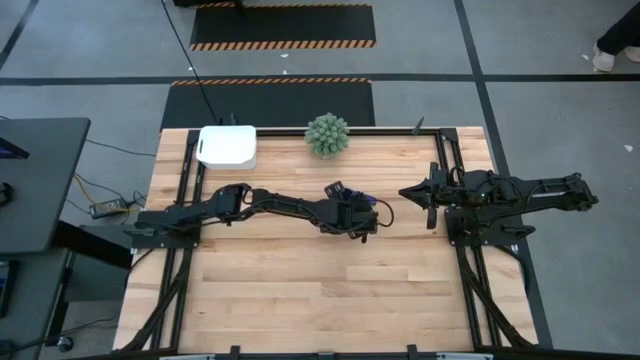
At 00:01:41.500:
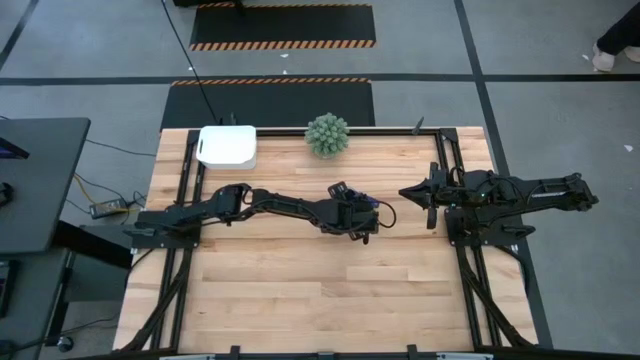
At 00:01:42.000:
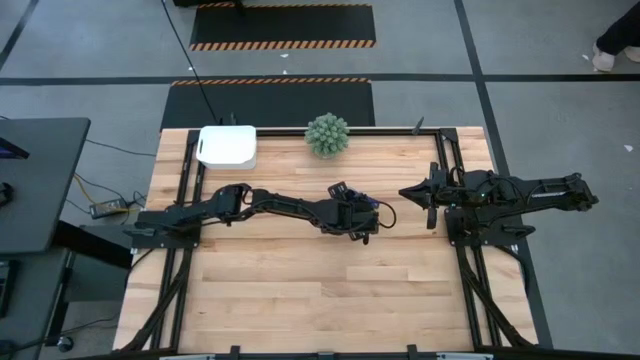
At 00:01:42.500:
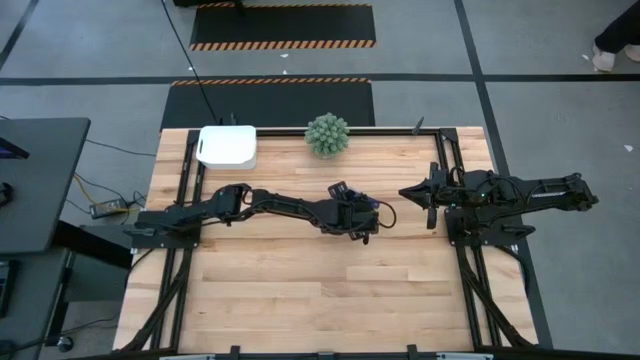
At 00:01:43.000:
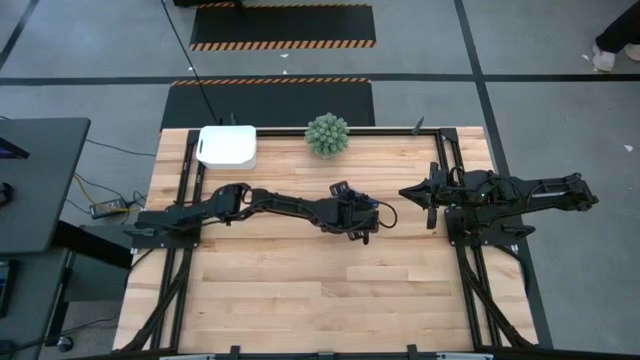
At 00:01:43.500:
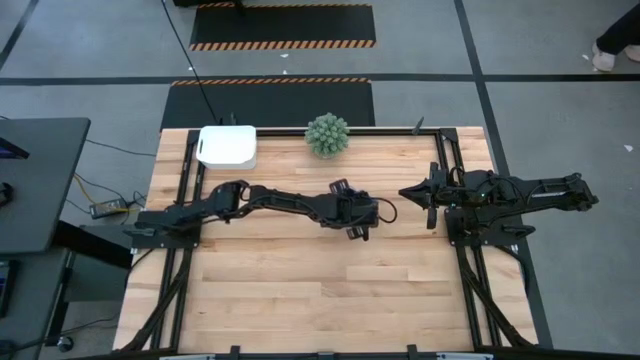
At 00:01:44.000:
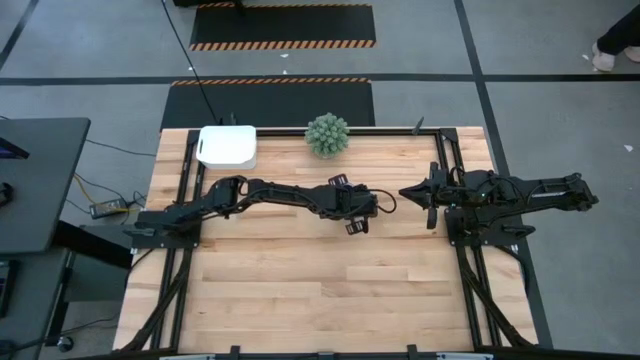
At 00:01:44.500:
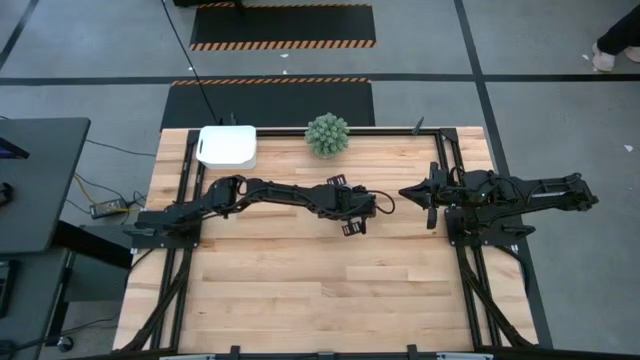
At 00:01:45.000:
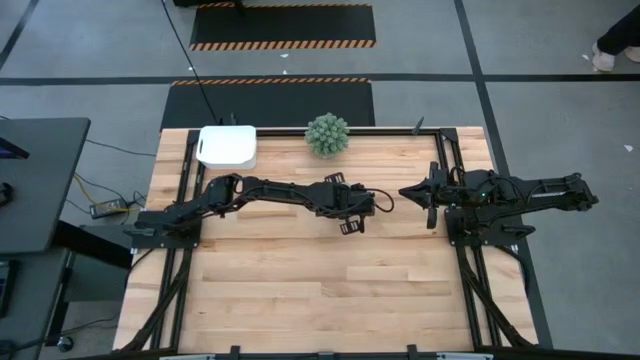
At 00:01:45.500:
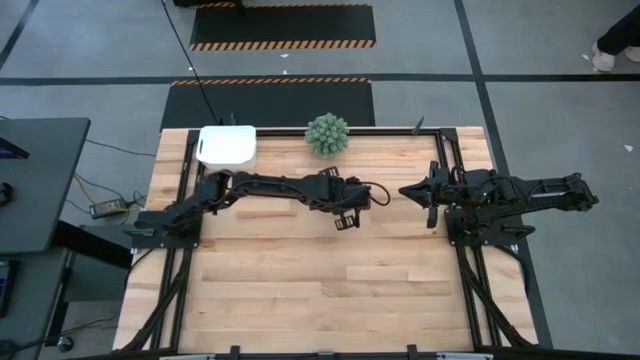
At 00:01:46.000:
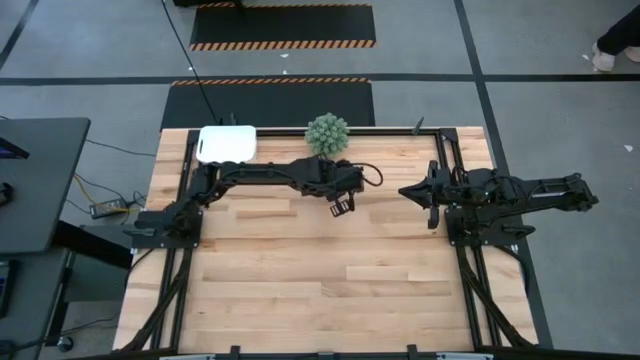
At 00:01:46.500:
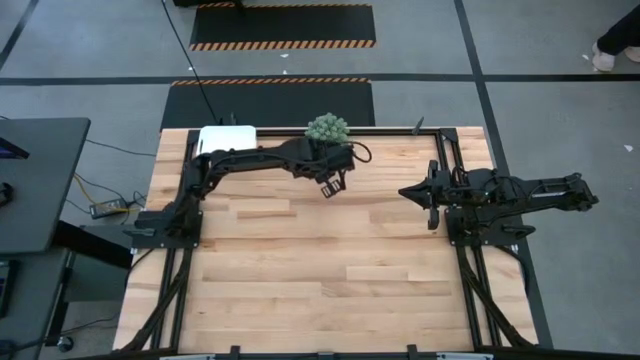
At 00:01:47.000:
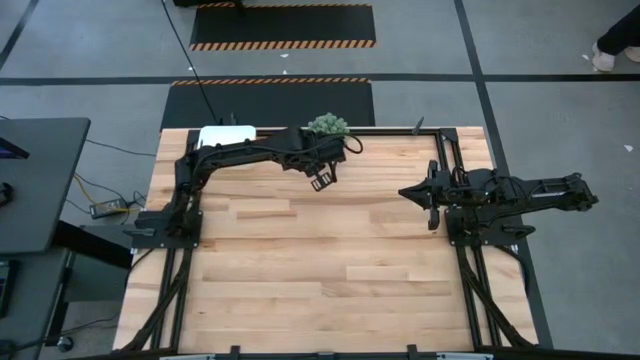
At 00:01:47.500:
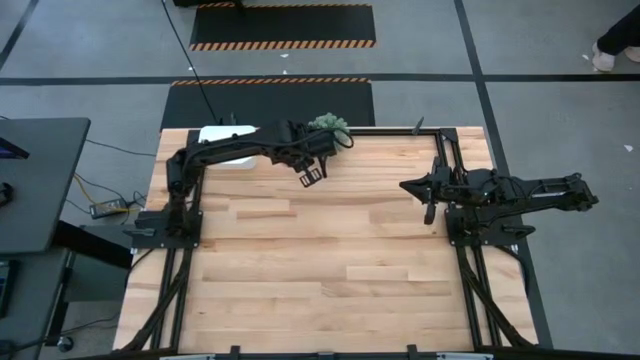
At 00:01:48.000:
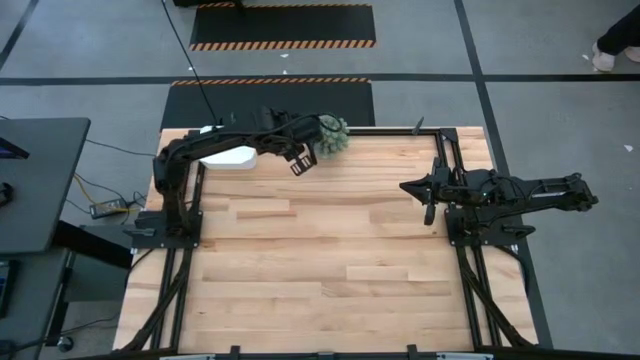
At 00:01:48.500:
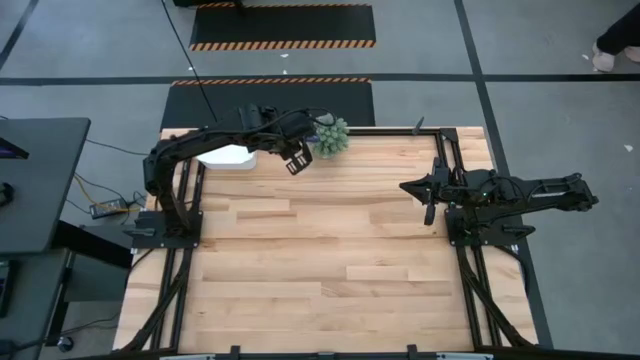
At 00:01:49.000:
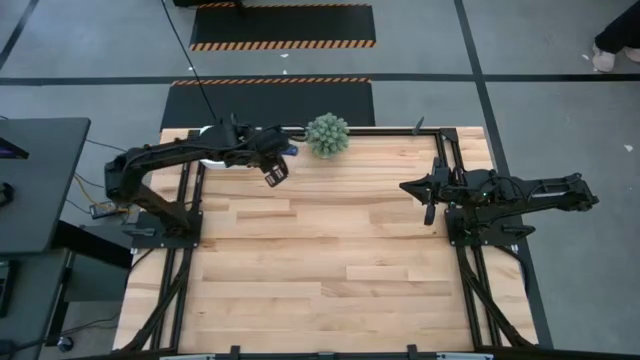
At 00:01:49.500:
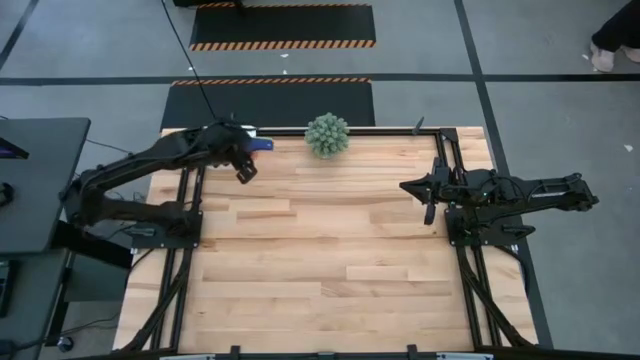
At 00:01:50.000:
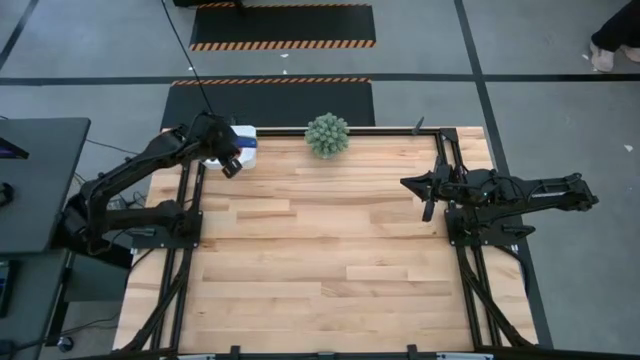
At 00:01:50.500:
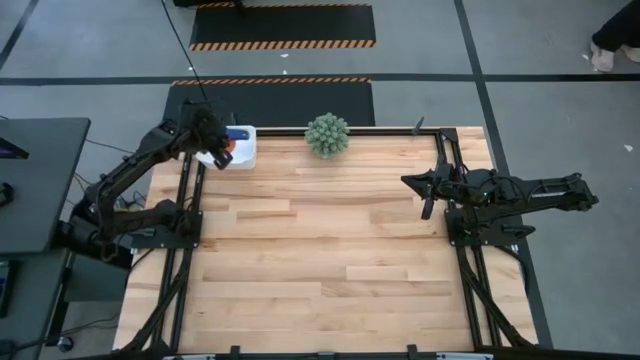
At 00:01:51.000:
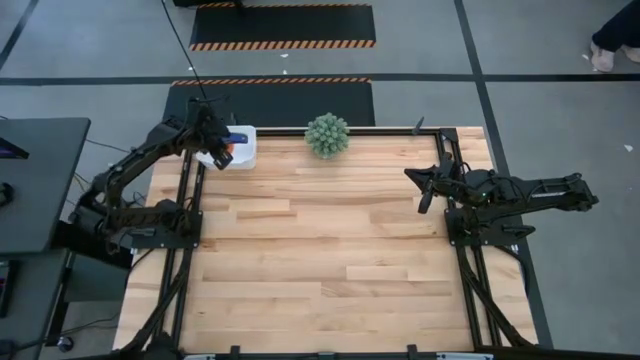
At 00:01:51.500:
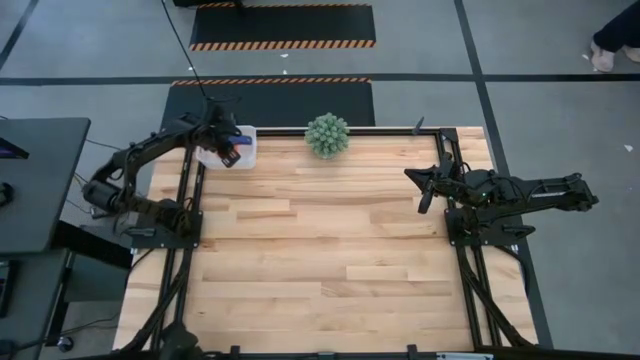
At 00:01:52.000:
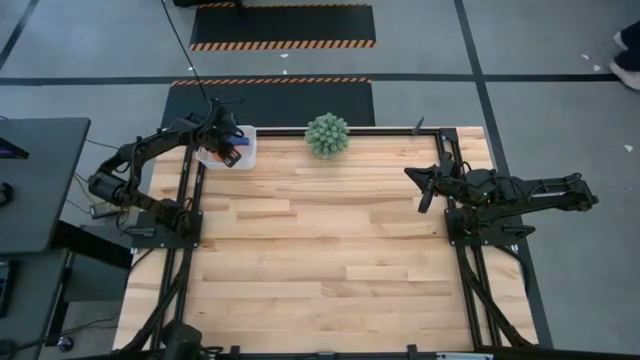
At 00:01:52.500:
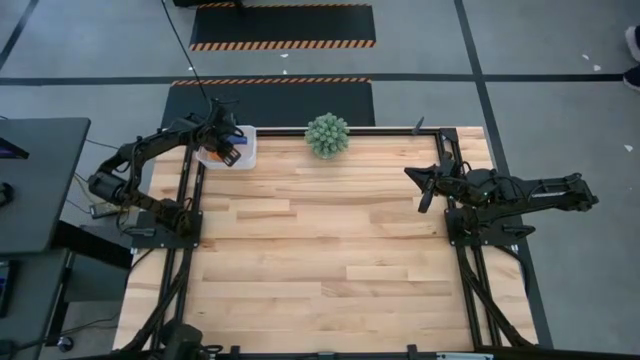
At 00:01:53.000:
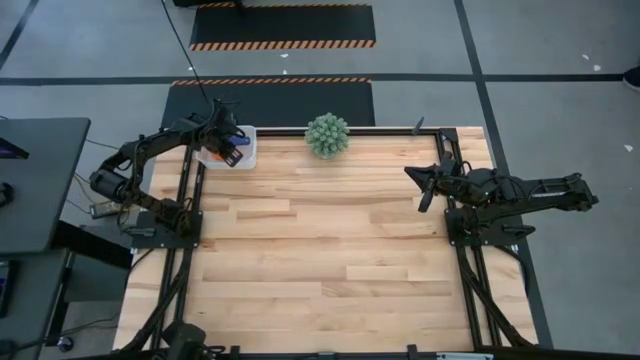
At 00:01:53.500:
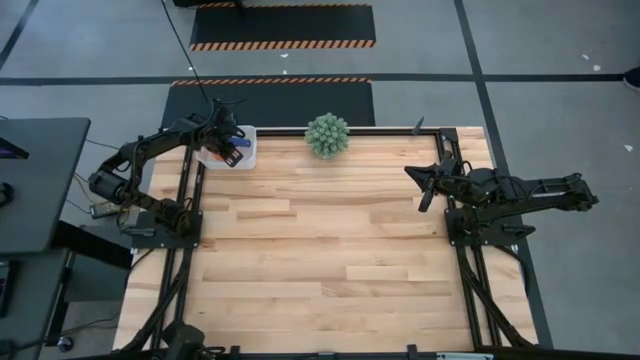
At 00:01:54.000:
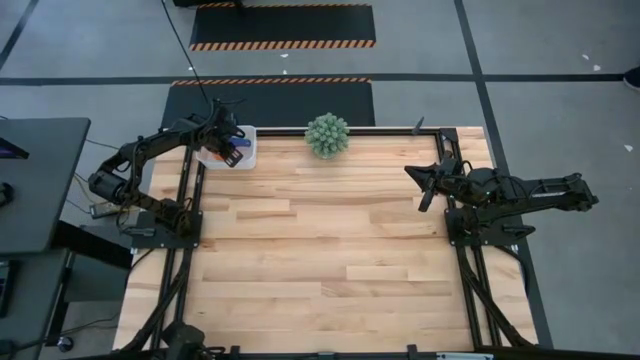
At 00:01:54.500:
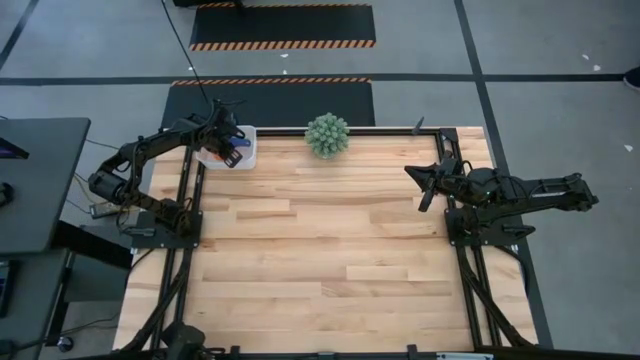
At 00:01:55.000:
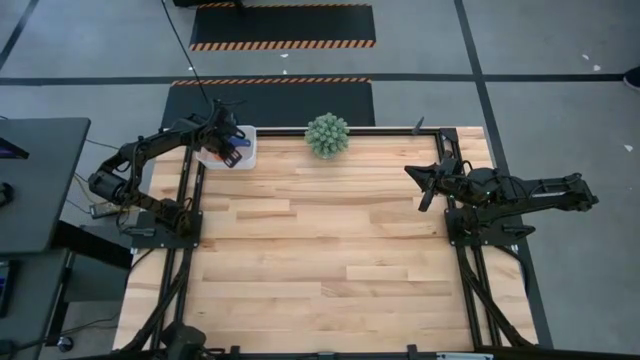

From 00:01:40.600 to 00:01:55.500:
Task: Nest measuring cups in basket
Put the nested measuring cups into the white bin

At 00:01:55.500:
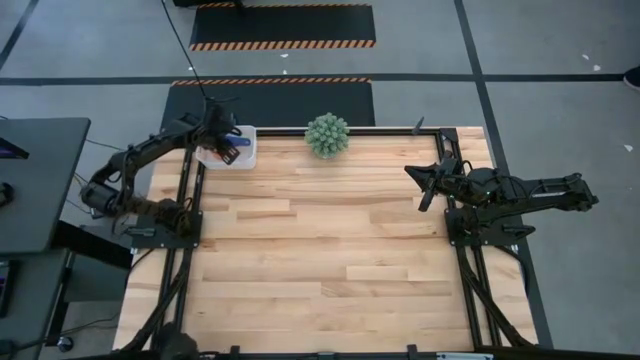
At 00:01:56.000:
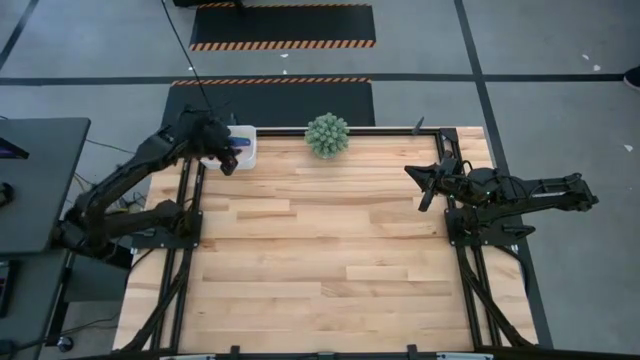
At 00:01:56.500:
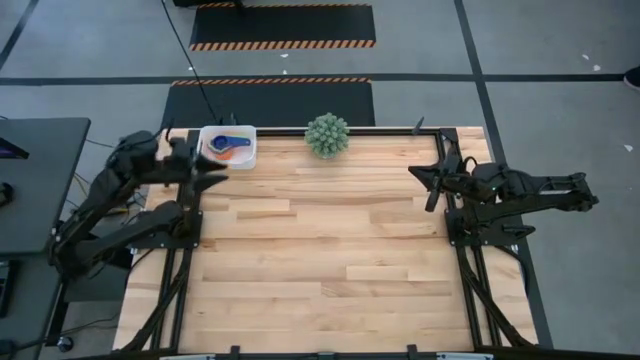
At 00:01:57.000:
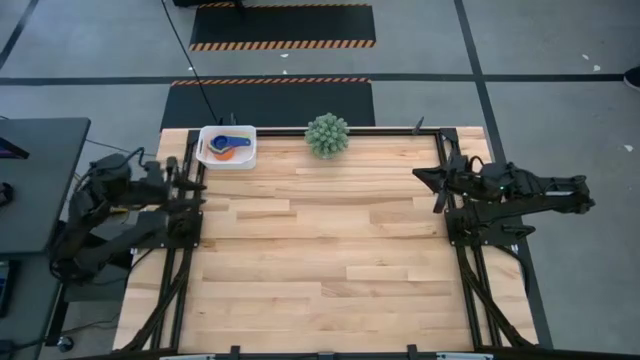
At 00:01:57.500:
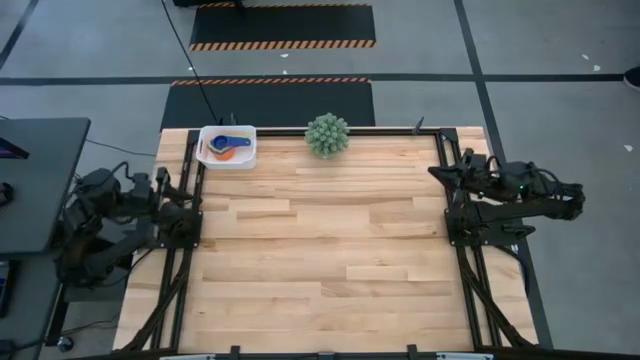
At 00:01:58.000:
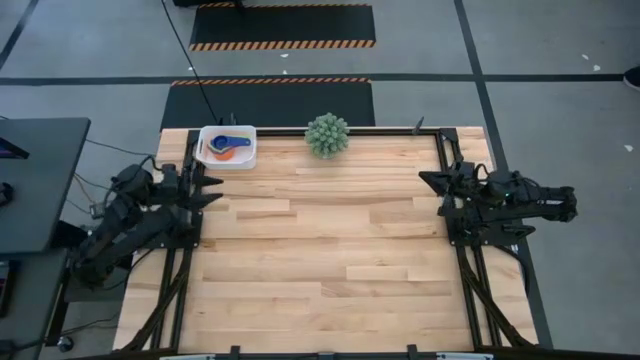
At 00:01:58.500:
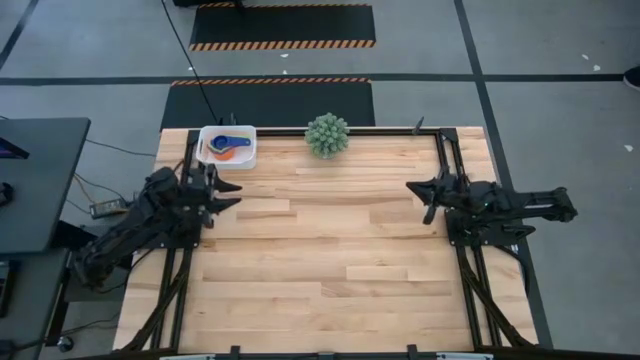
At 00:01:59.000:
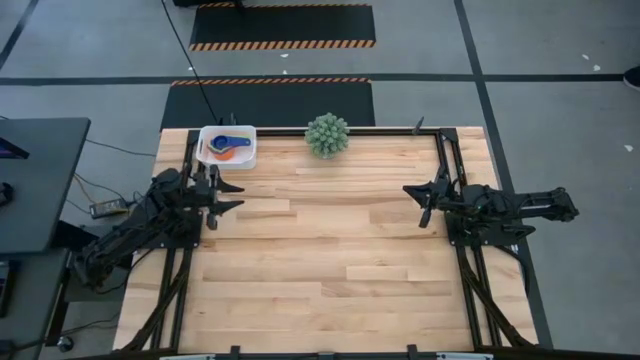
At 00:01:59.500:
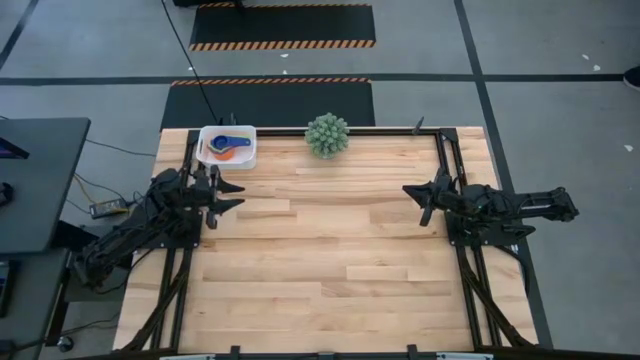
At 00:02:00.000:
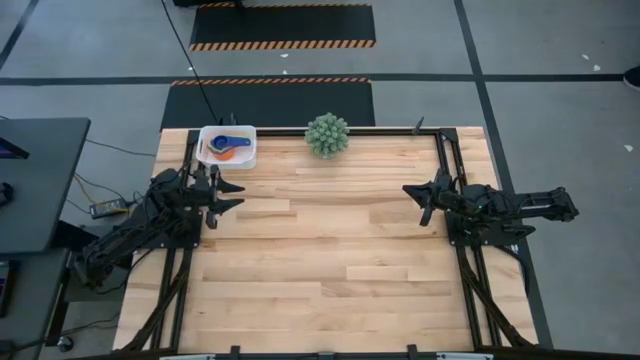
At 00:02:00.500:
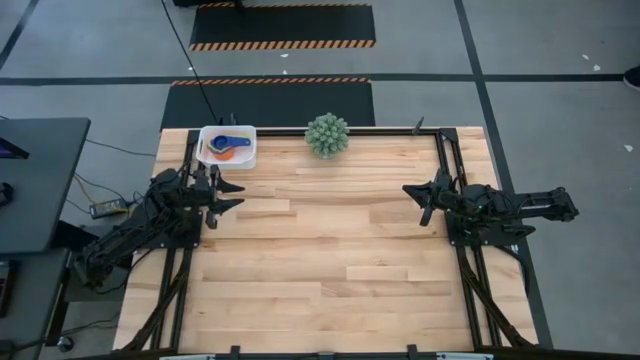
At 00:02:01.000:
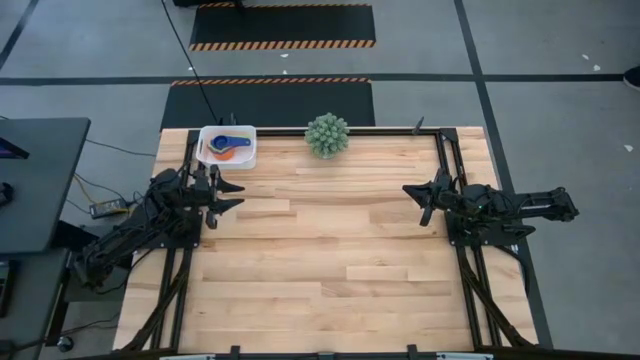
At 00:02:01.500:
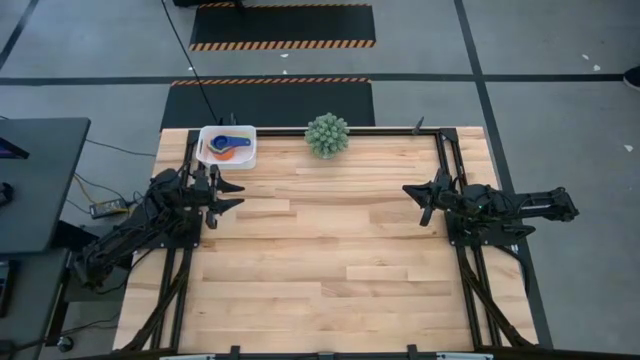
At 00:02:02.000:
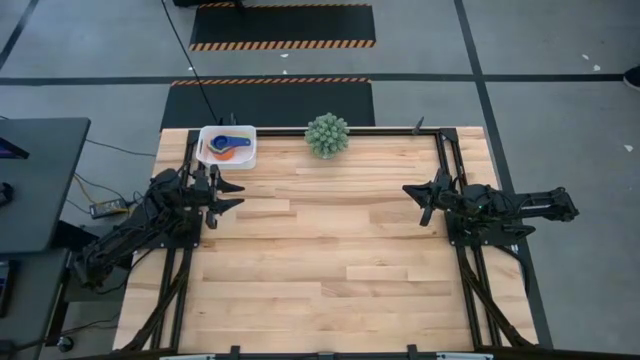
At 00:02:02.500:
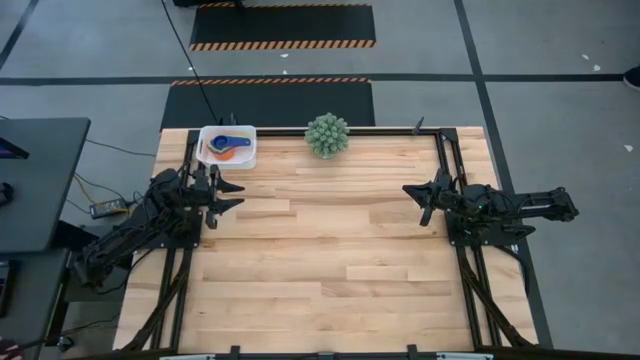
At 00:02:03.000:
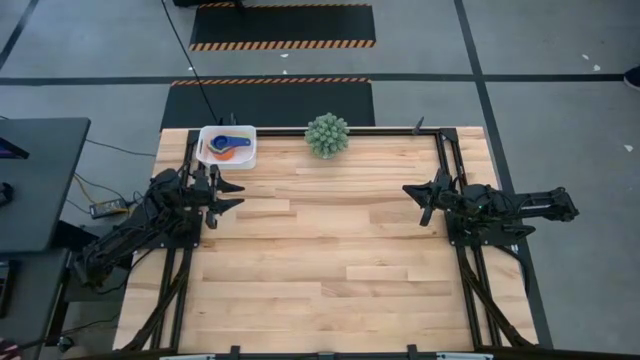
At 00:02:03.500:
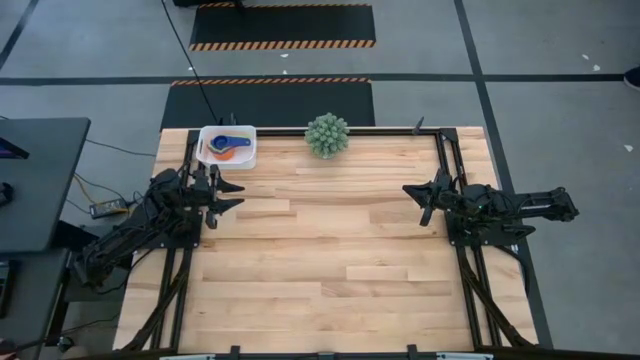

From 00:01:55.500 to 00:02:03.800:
Return to Home Position
